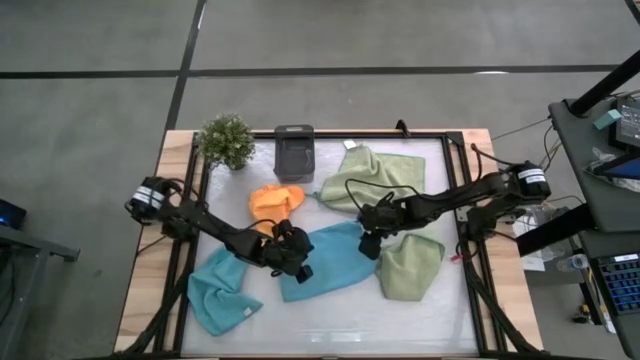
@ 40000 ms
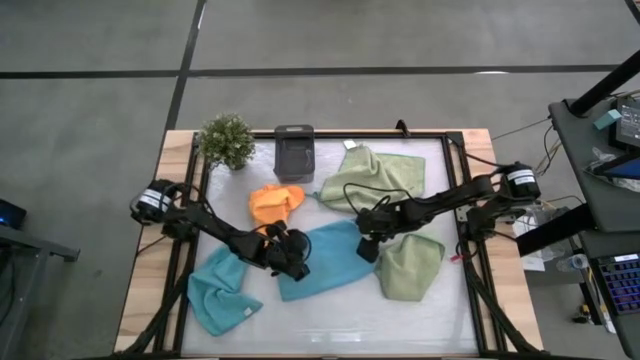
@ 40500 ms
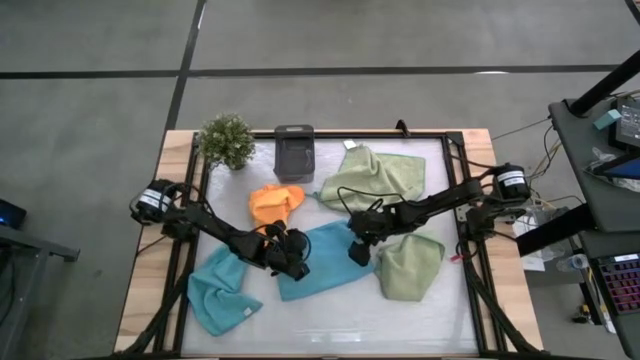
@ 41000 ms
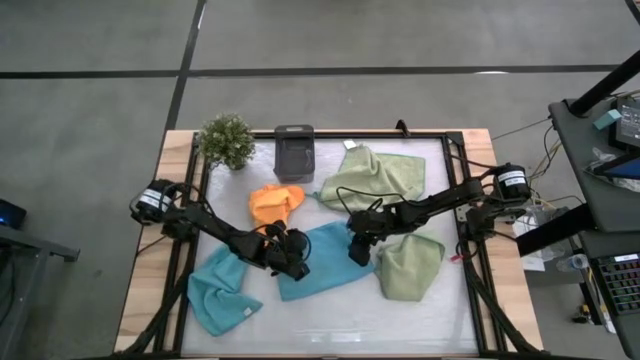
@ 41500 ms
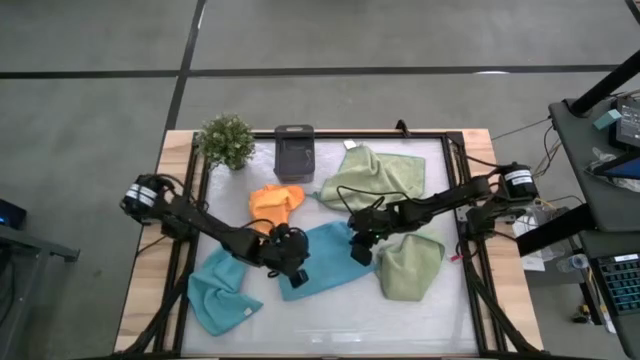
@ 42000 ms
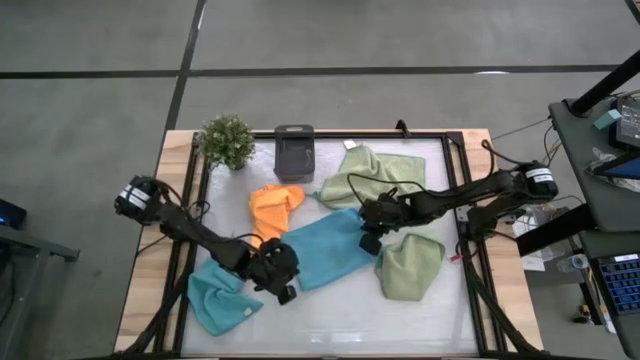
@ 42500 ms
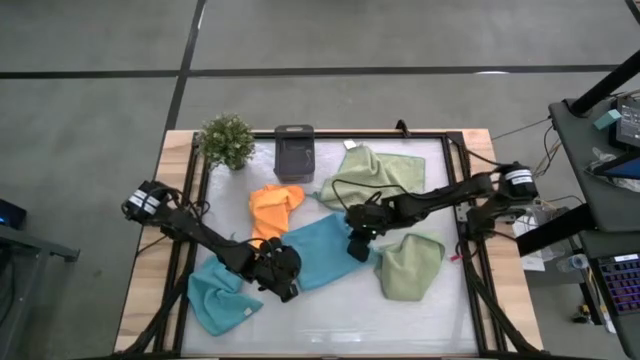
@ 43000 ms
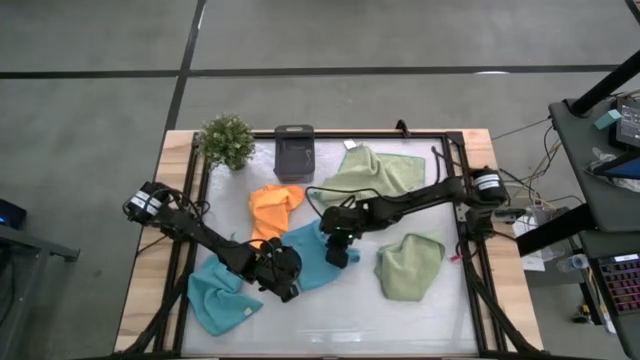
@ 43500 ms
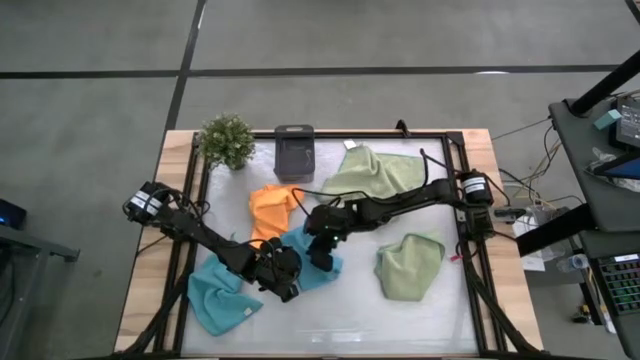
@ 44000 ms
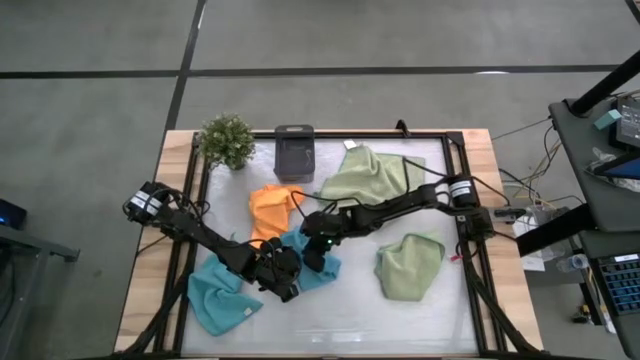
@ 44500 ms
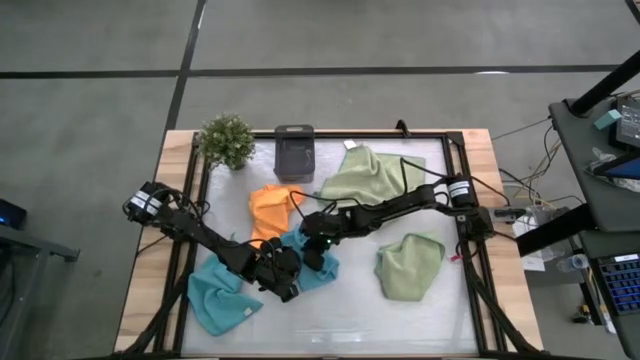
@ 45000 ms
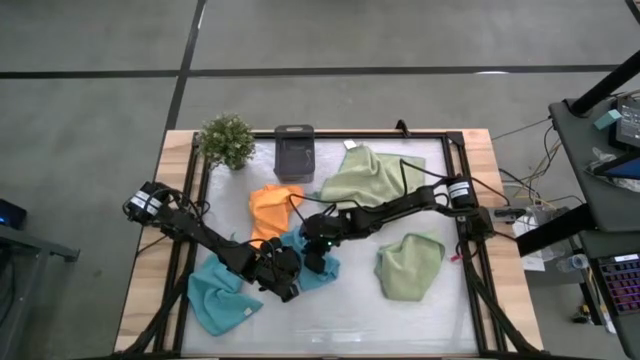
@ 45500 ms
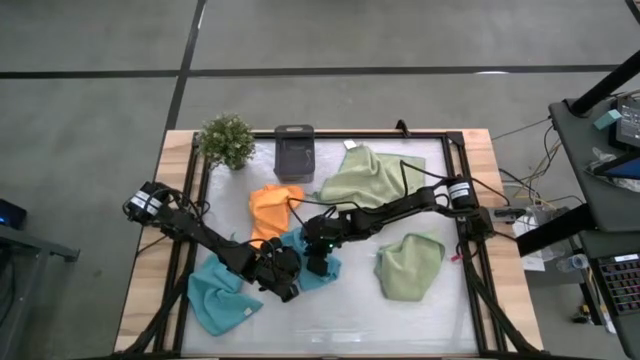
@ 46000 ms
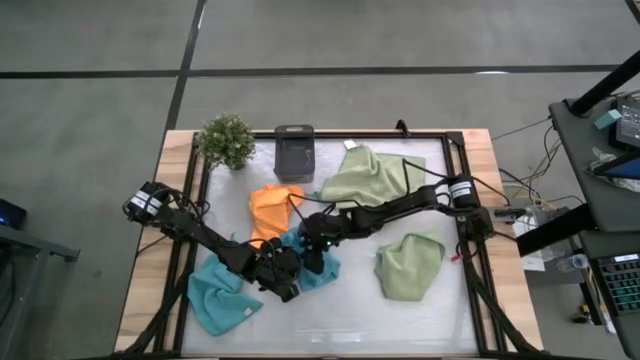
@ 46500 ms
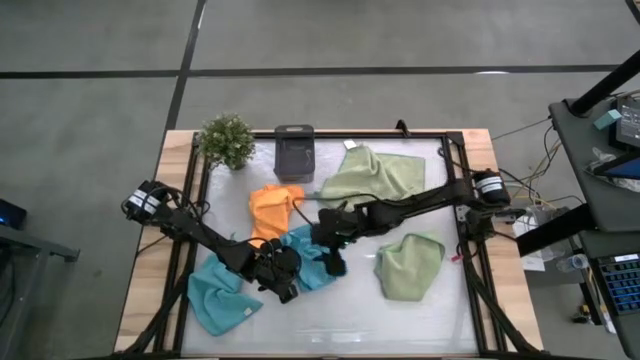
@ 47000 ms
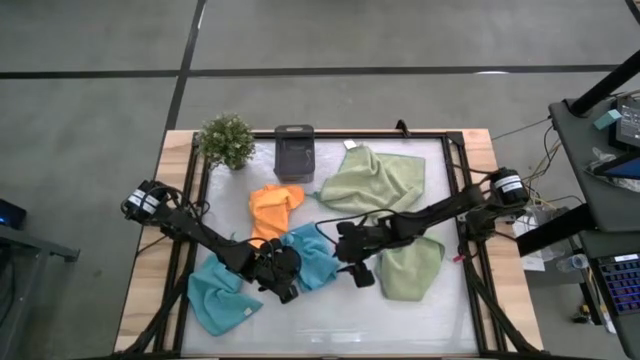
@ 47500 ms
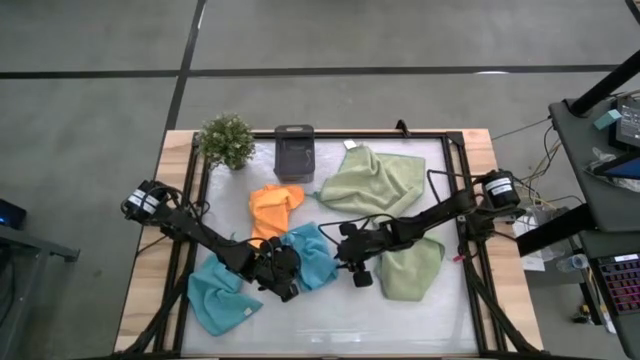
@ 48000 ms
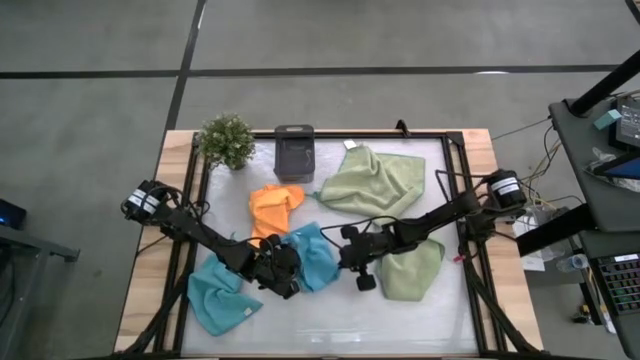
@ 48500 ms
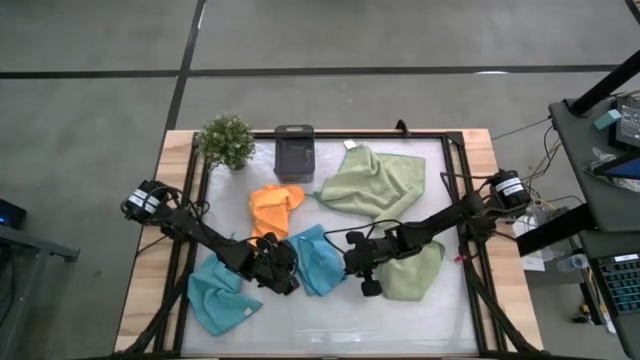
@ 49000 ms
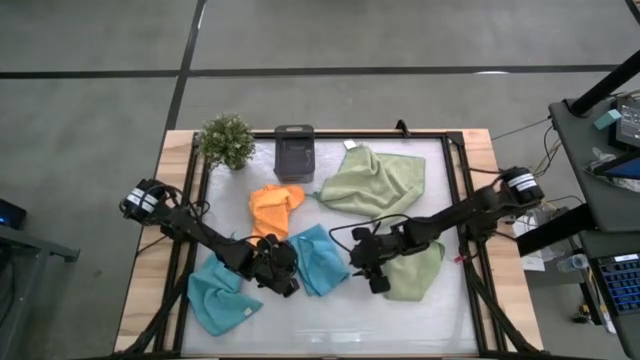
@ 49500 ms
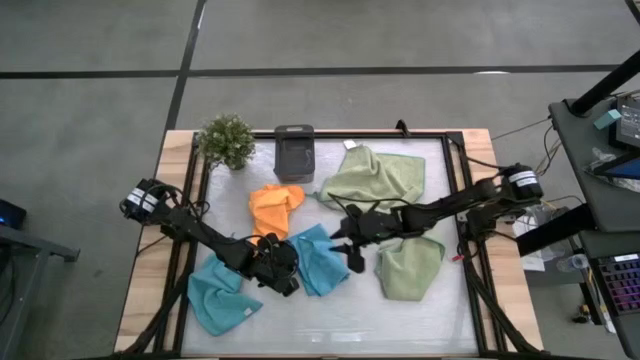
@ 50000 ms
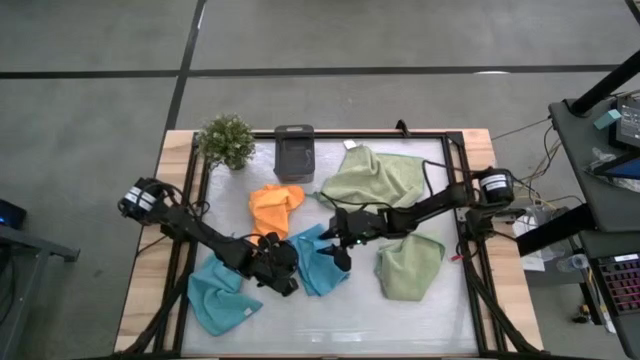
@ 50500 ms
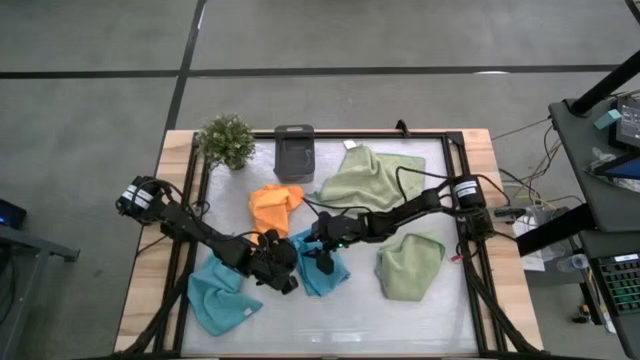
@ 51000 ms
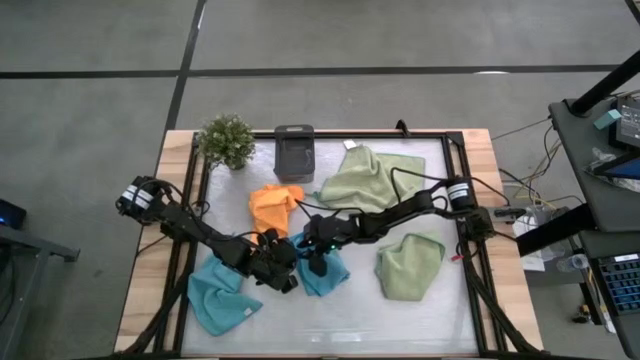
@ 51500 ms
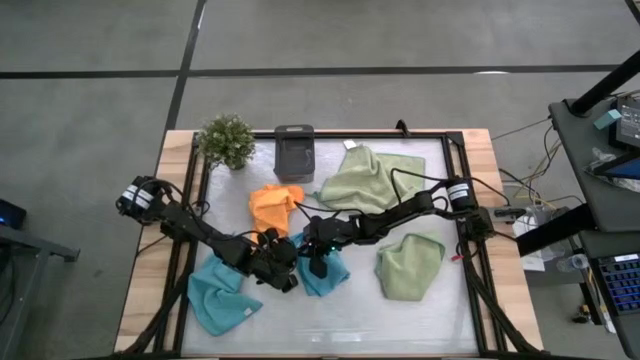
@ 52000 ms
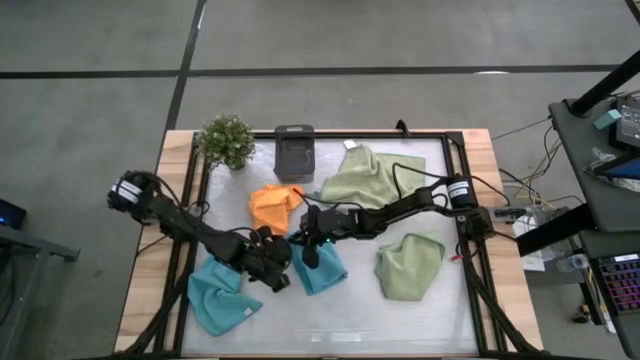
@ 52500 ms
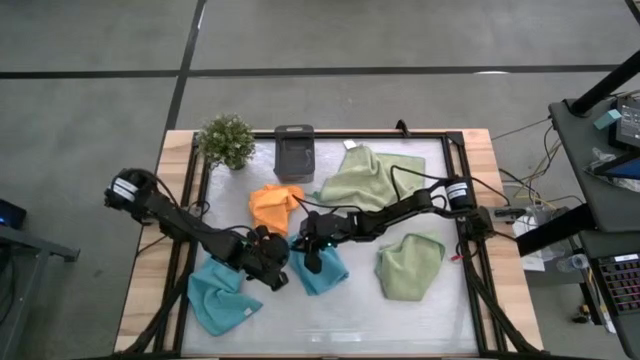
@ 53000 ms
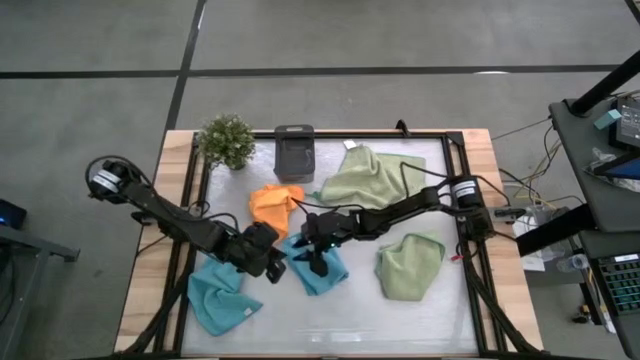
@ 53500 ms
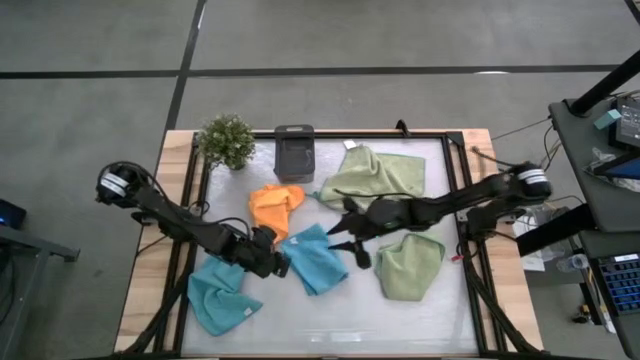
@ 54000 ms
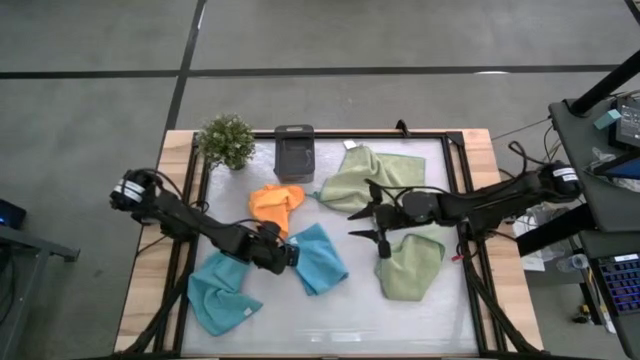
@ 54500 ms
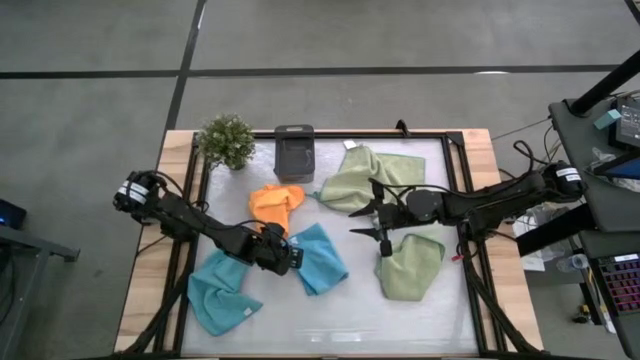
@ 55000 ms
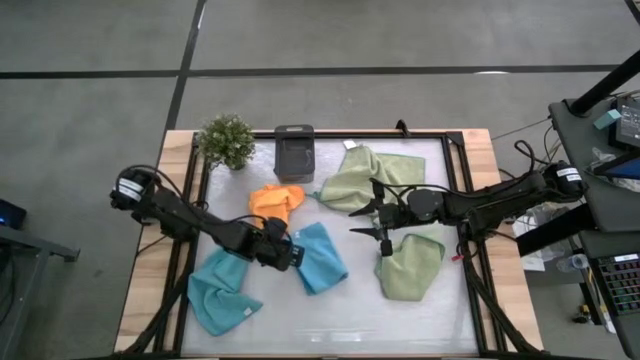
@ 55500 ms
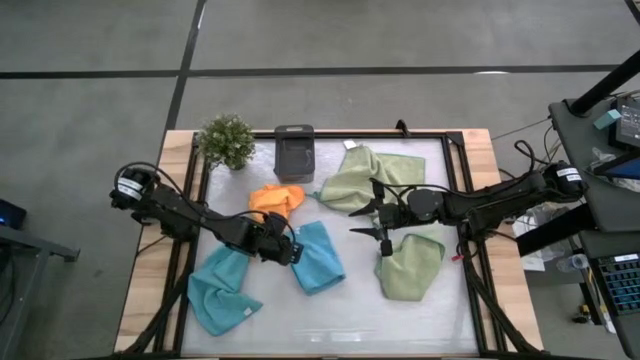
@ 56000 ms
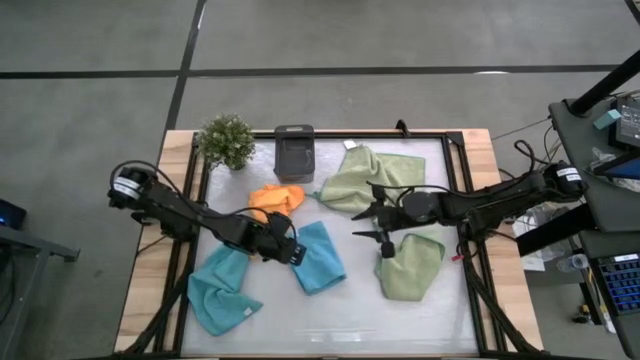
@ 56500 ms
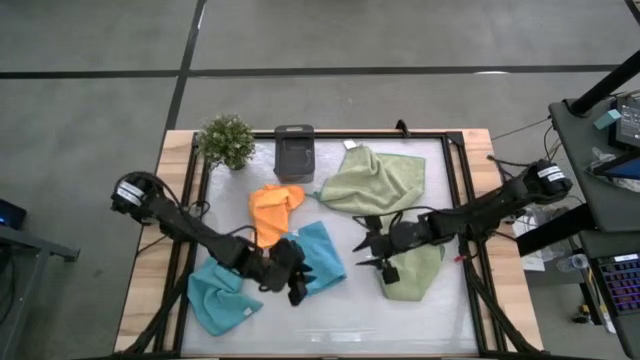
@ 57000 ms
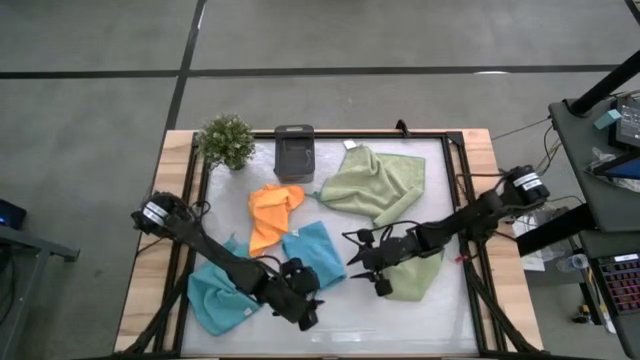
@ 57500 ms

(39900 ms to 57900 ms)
Task: Fold microfiber towels
Fold the right blue towel
